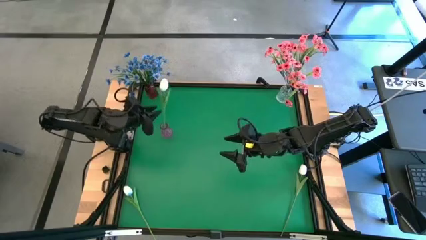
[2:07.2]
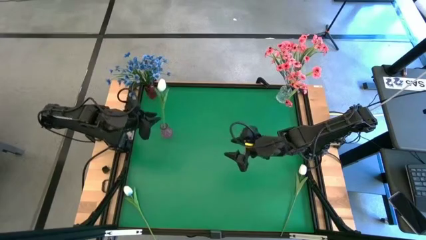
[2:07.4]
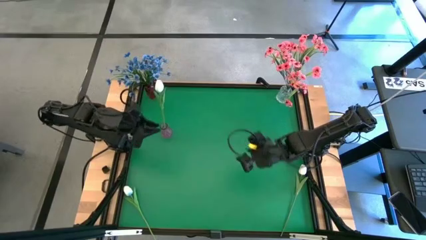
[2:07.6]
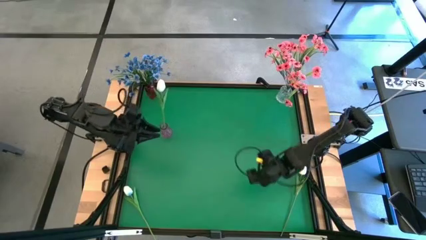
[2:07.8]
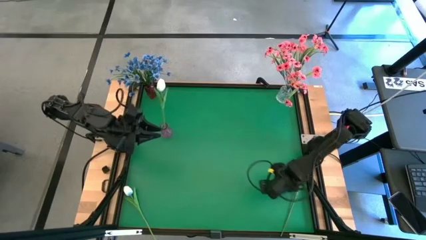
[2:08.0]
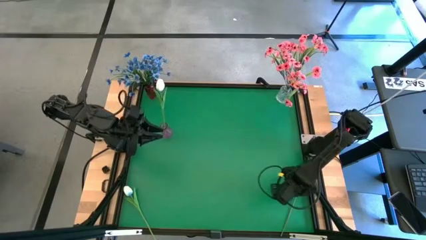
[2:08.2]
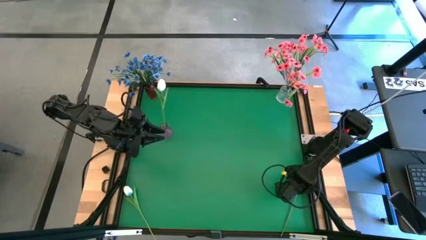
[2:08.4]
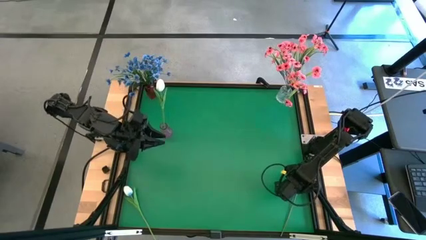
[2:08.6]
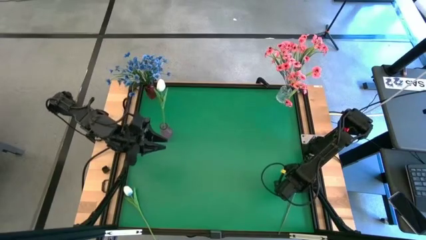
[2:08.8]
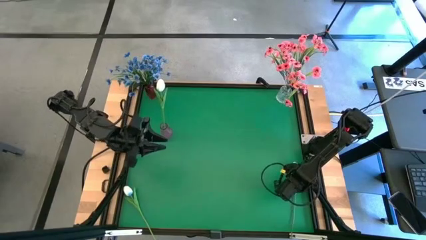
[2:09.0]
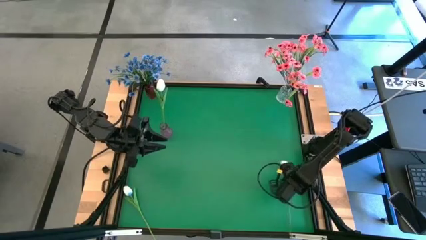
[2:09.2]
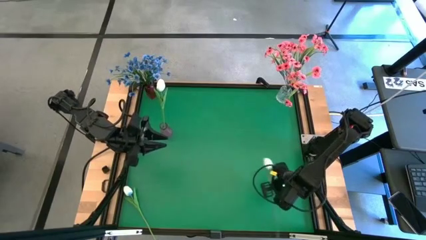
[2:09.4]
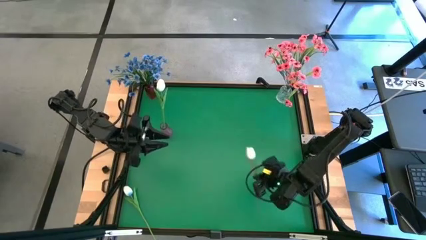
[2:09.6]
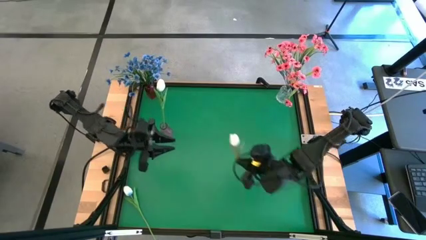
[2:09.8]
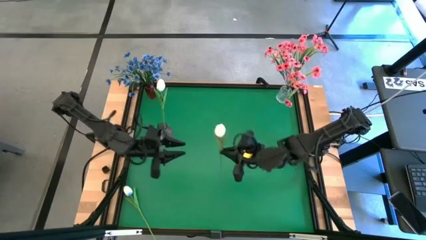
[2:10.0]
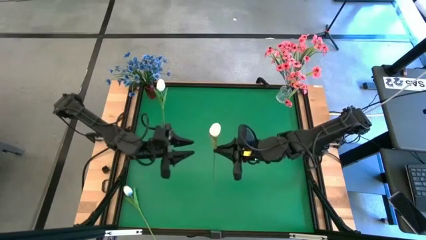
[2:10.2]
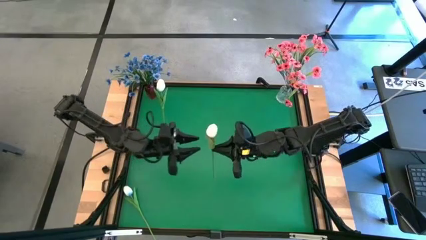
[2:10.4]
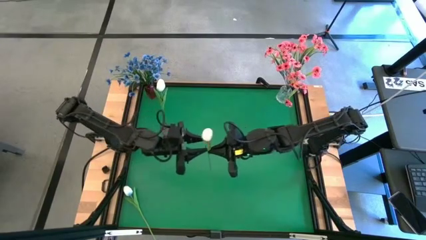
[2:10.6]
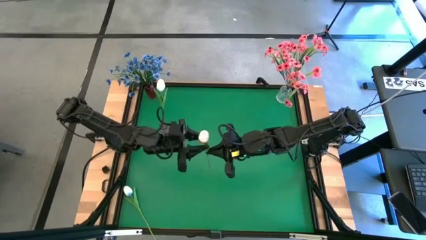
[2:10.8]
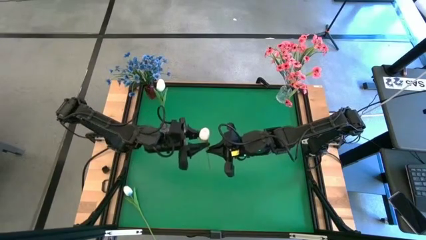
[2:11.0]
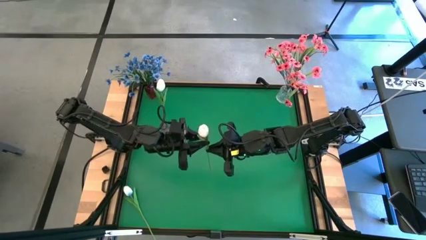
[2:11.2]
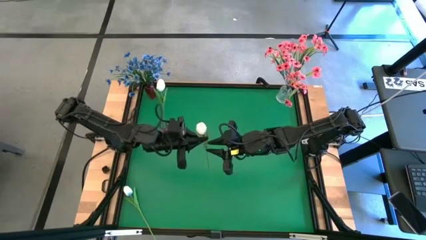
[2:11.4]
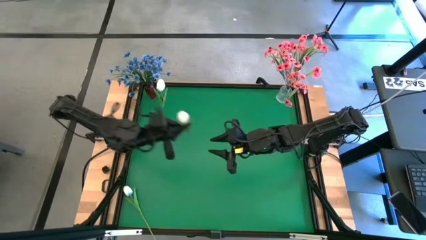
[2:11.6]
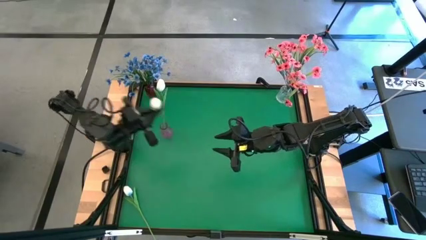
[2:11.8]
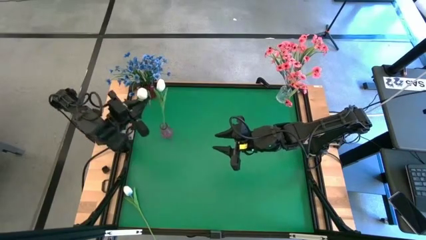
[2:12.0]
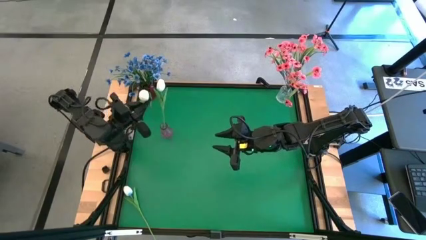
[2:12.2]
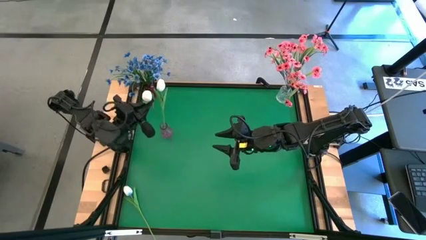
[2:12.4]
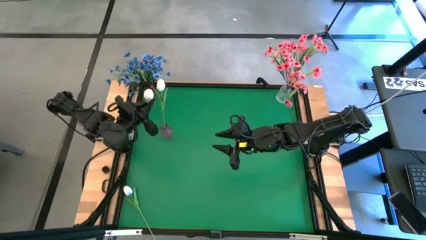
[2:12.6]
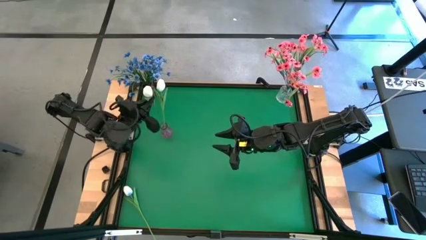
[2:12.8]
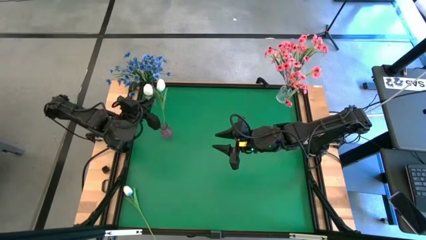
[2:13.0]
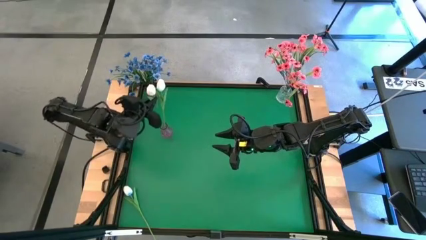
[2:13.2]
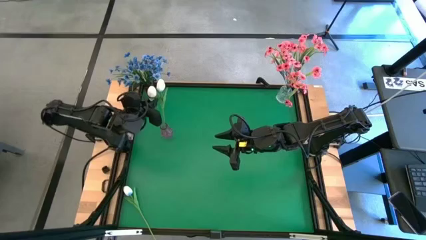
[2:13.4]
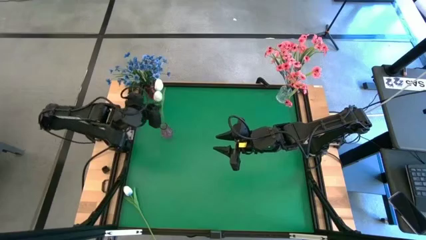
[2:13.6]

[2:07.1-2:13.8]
Task: Sort flowers into vase by color
Put the top white tulip into the purple vase

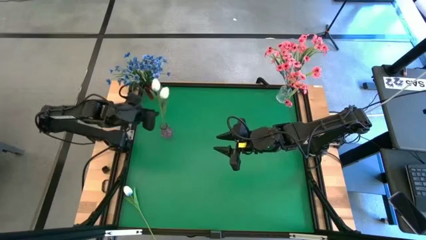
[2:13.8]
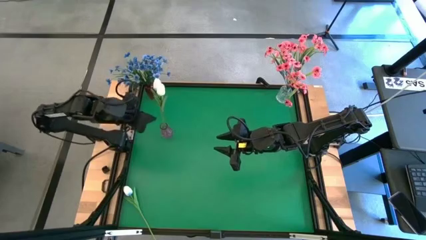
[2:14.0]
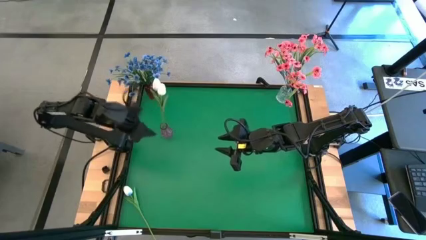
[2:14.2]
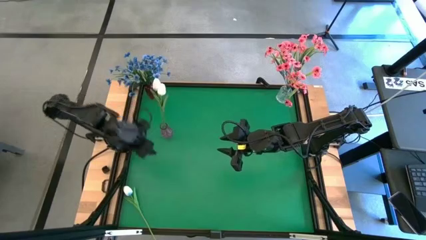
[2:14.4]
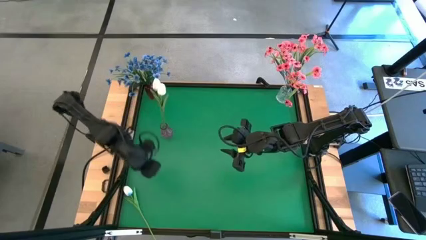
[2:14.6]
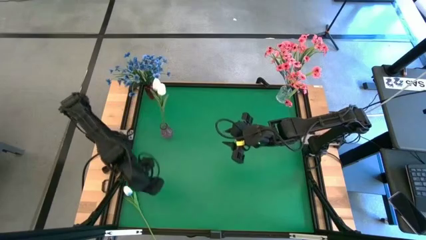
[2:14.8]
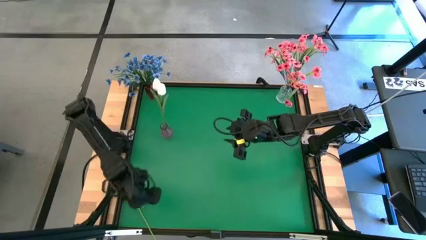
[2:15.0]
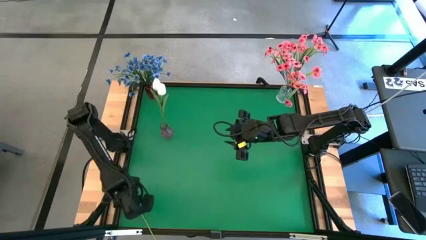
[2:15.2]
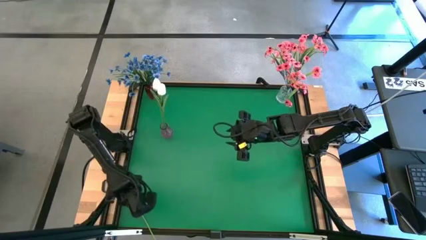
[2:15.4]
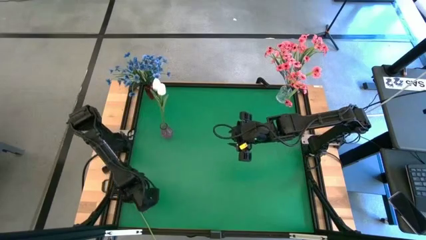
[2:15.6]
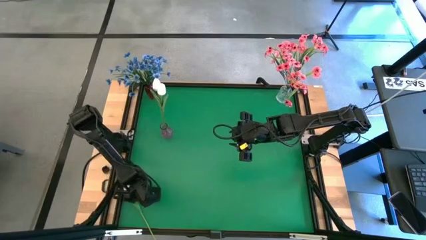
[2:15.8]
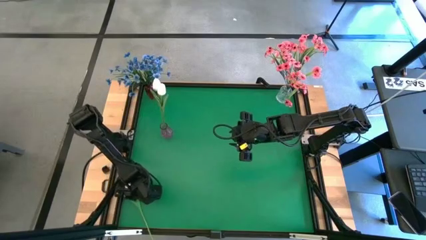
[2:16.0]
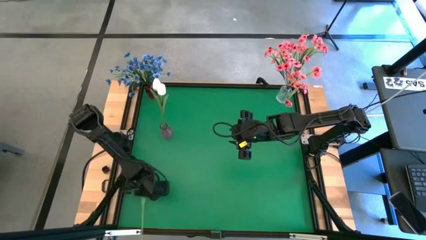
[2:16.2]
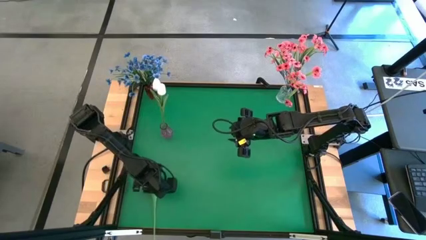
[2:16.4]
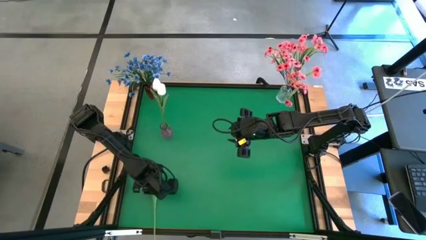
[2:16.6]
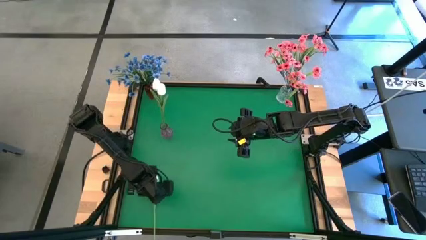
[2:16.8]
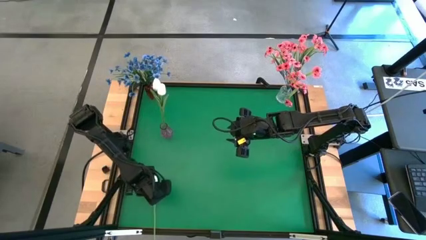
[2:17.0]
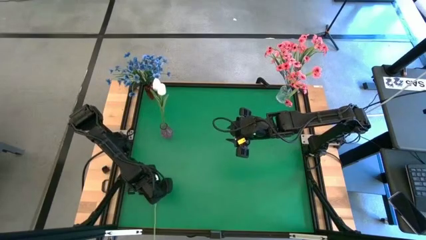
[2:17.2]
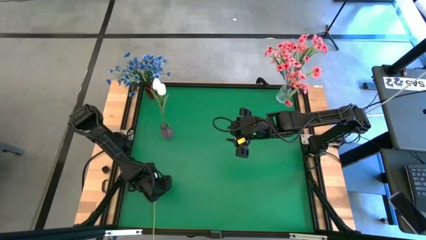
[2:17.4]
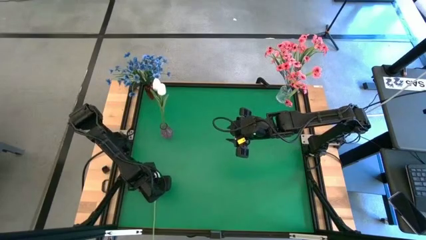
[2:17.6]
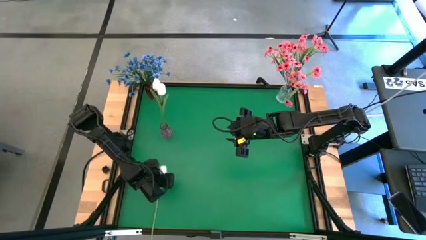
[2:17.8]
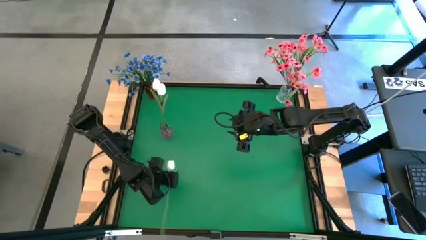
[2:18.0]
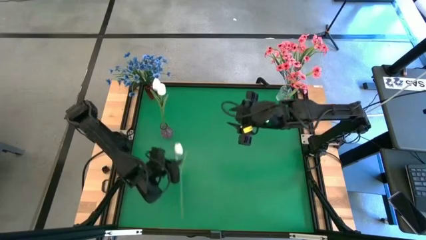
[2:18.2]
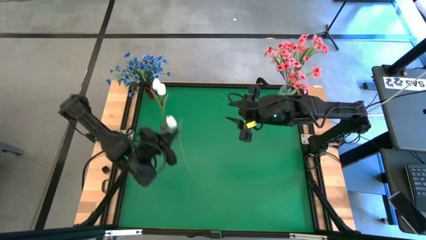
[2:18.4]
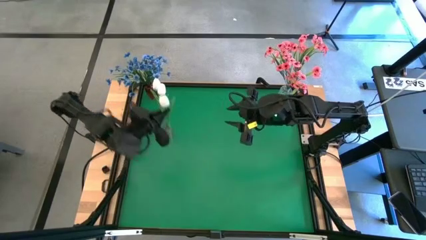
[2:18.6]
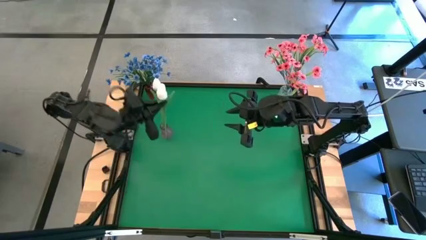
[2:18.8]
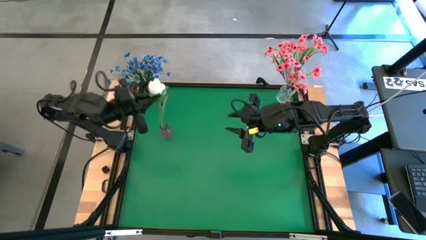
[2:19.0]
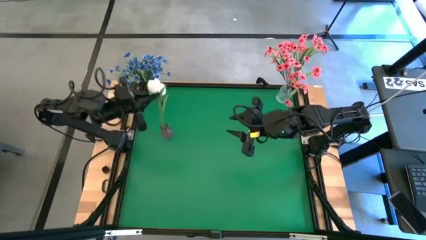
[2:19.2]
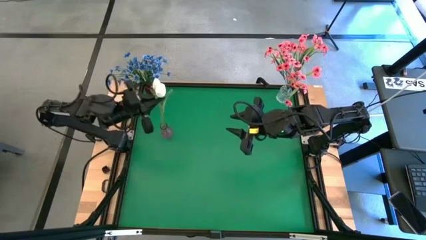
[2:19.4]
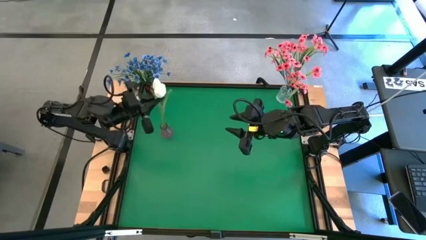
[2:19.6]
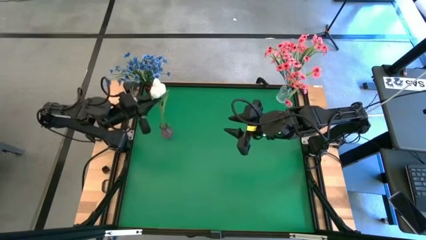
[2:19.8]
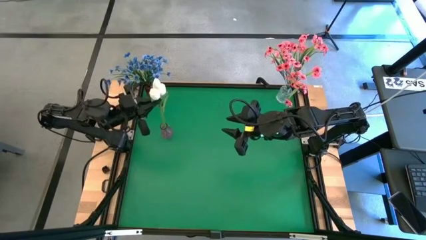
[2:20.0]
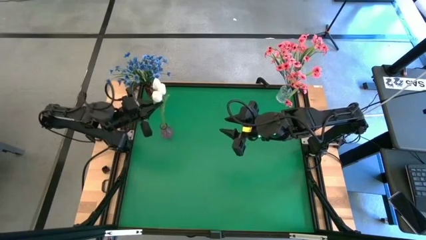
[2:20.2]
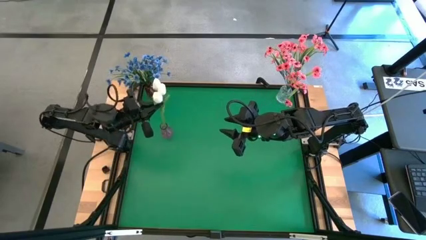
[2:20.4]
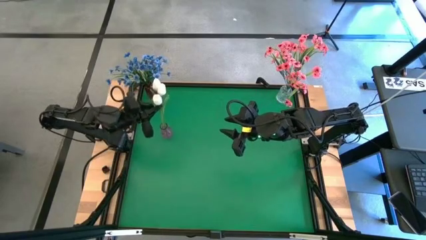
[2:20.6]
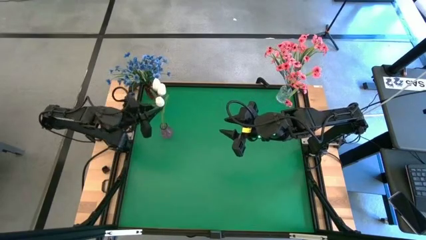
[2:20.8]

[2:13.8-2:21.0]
Put the white tulip into the purple vase

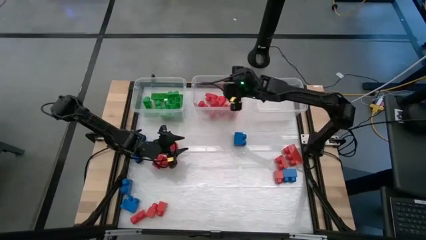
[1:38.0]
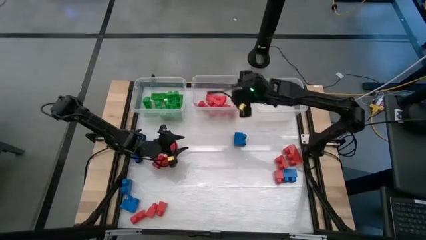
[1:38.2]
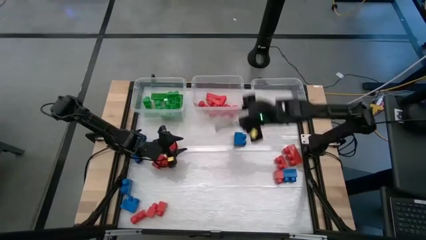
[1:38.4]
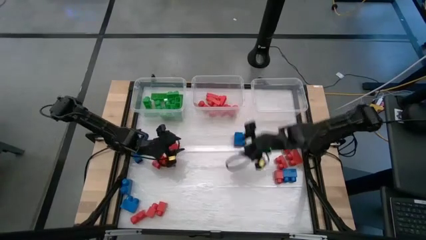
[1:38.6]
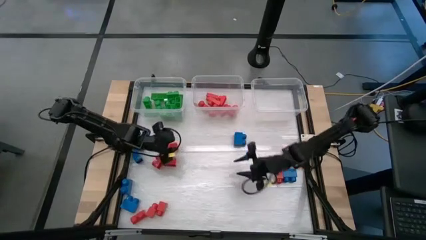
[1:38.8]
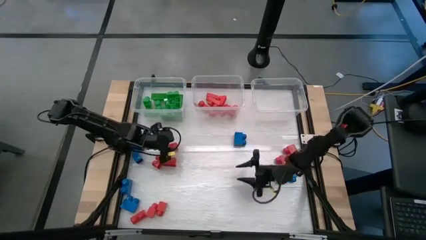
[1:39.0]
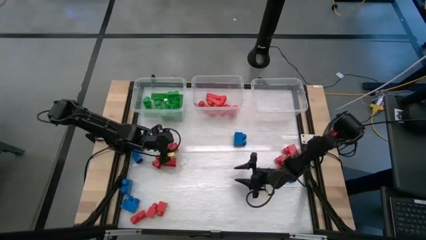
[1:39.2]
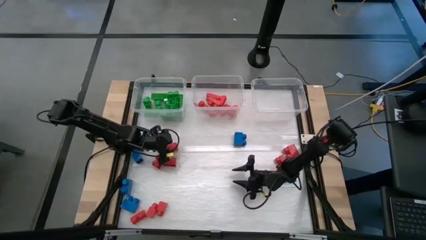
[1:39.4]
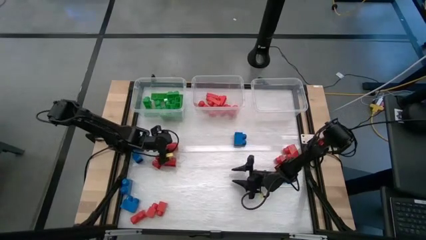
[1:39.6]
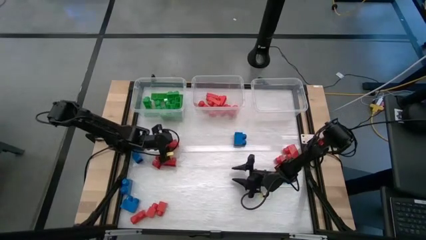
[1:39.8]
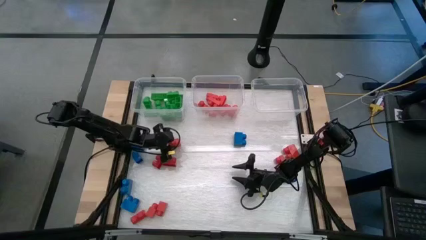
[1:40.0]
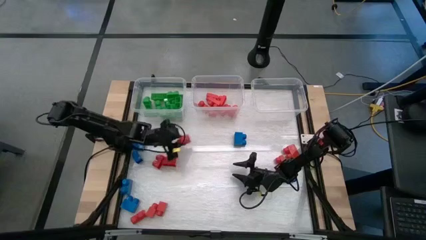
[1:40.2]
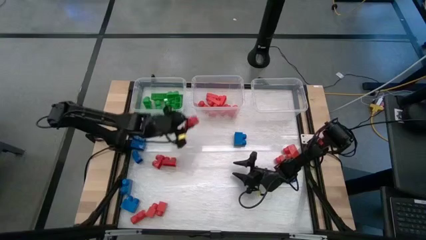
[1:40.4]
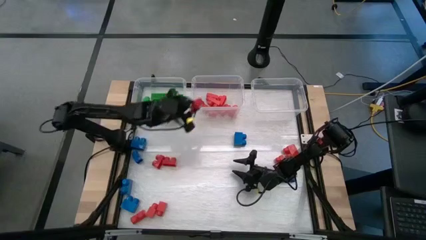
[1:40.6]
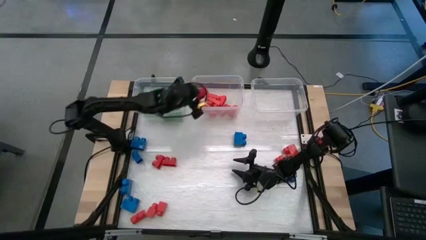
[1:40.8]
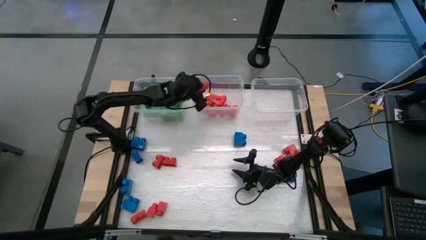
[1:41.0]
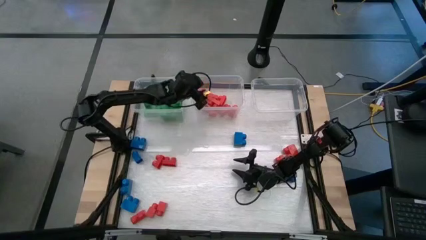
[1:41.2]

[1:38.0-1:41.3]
Task: Sort blocks
Put the red game piece into the middle transparent bin
